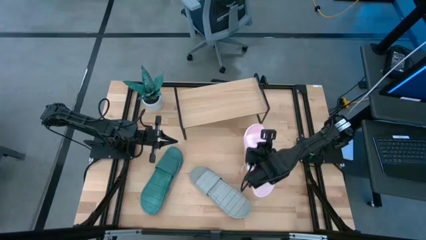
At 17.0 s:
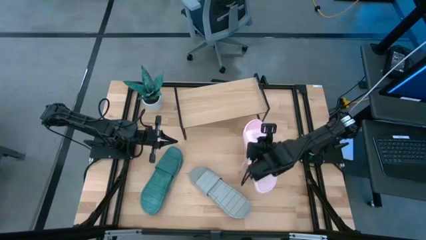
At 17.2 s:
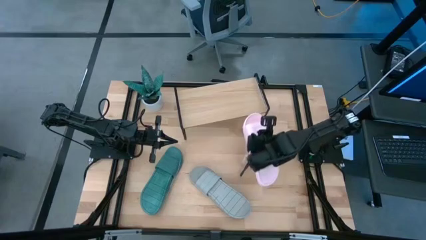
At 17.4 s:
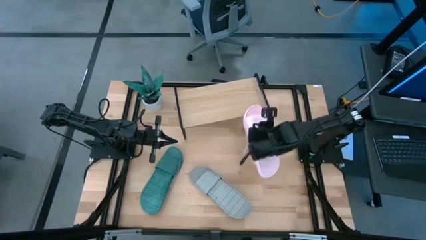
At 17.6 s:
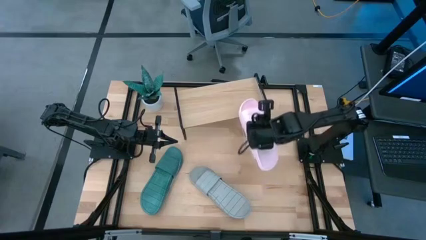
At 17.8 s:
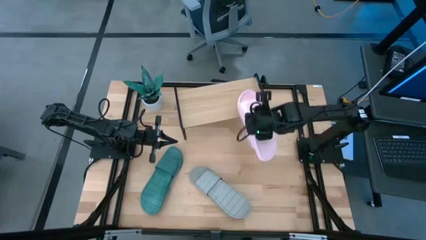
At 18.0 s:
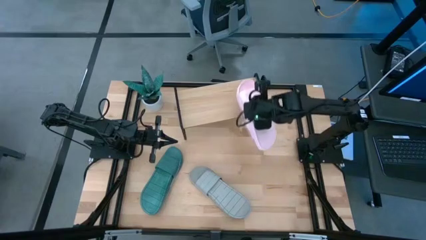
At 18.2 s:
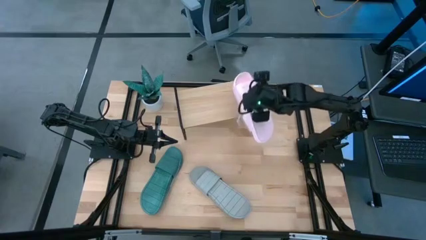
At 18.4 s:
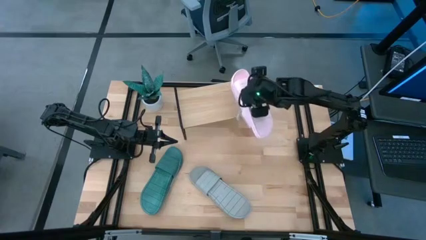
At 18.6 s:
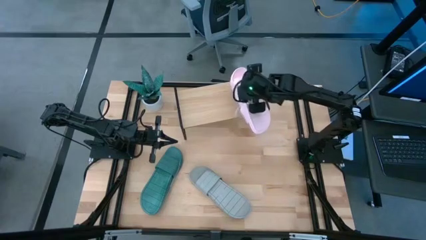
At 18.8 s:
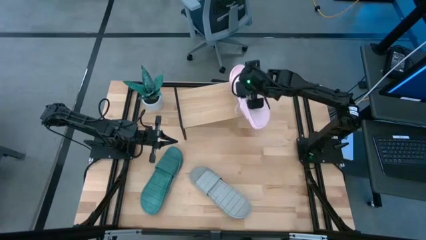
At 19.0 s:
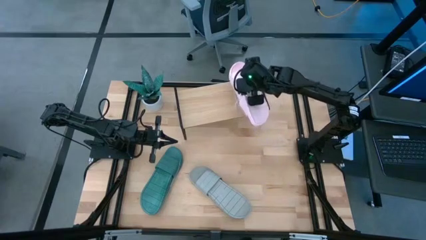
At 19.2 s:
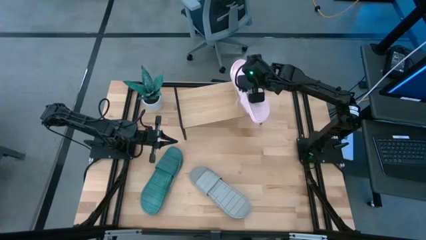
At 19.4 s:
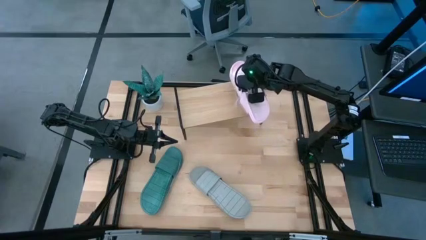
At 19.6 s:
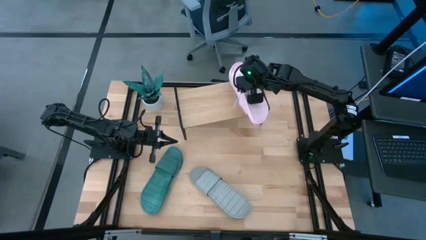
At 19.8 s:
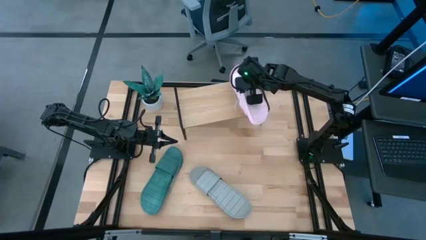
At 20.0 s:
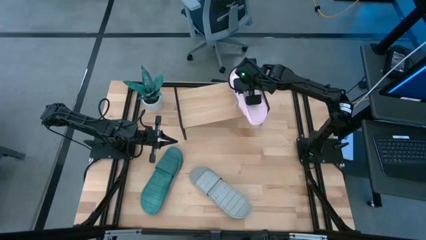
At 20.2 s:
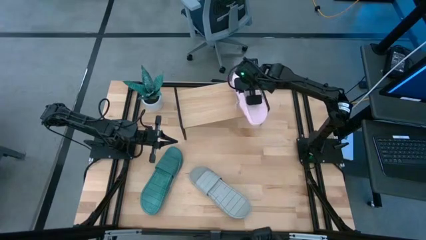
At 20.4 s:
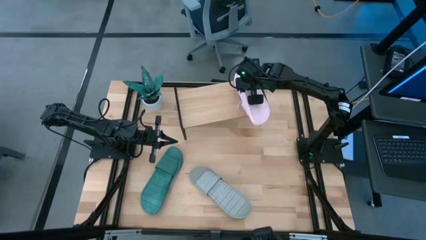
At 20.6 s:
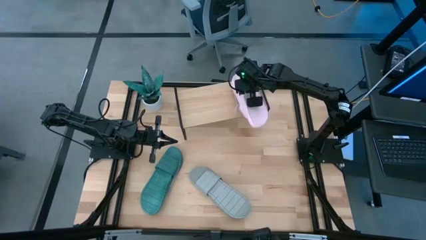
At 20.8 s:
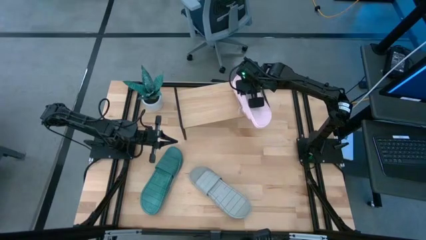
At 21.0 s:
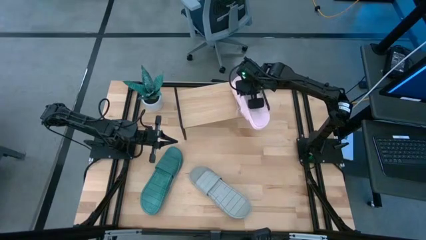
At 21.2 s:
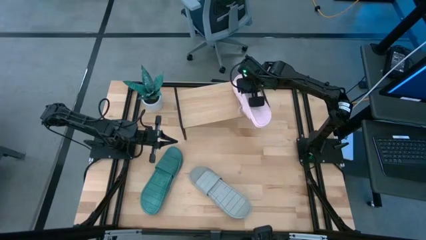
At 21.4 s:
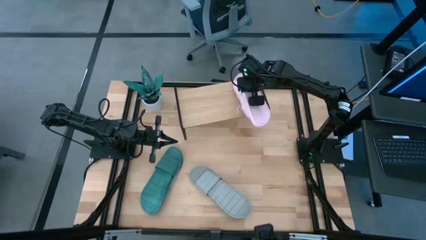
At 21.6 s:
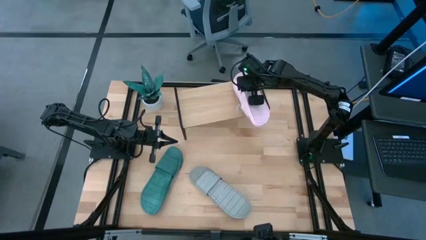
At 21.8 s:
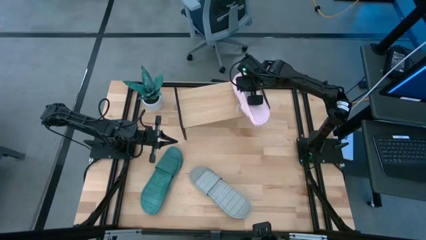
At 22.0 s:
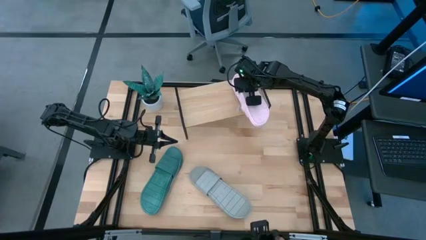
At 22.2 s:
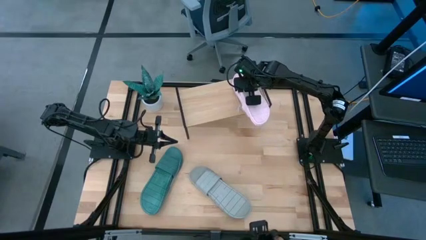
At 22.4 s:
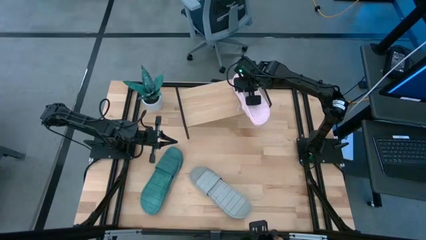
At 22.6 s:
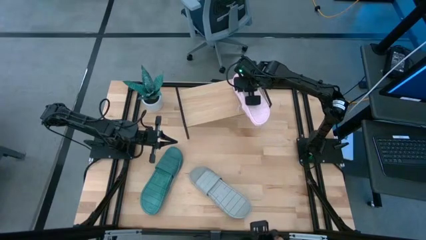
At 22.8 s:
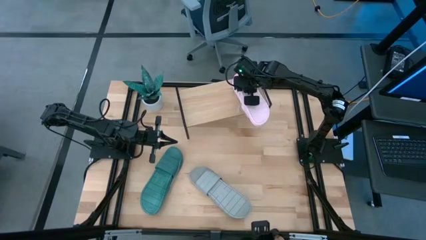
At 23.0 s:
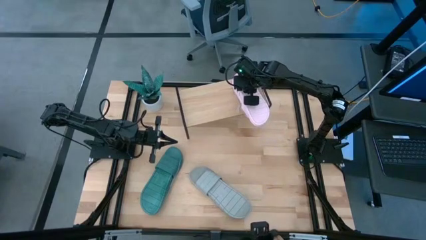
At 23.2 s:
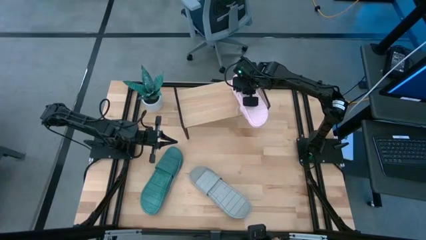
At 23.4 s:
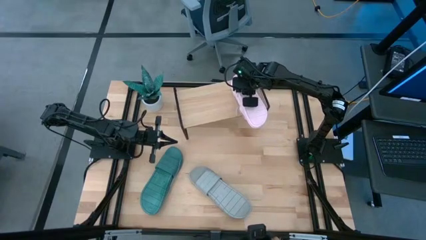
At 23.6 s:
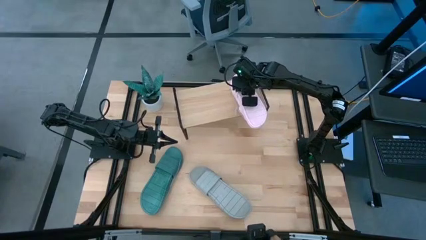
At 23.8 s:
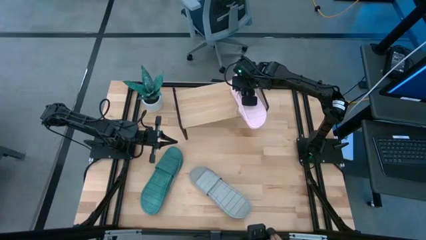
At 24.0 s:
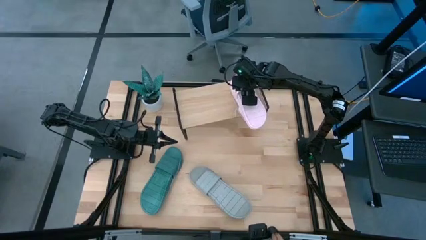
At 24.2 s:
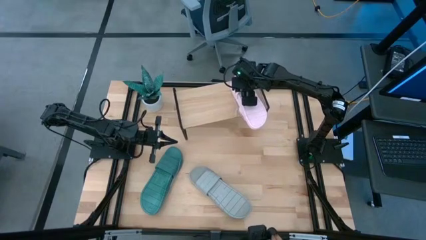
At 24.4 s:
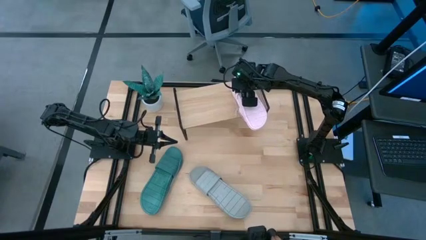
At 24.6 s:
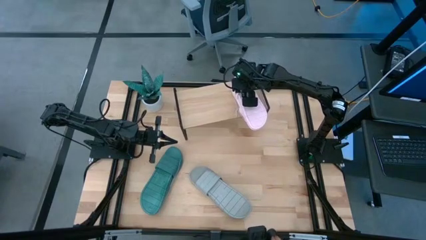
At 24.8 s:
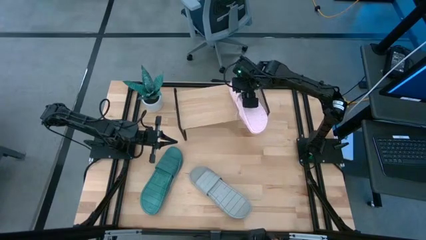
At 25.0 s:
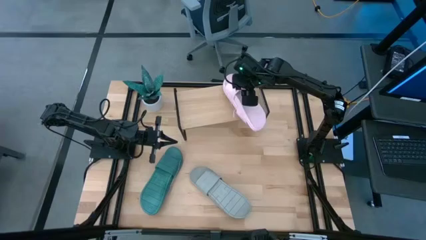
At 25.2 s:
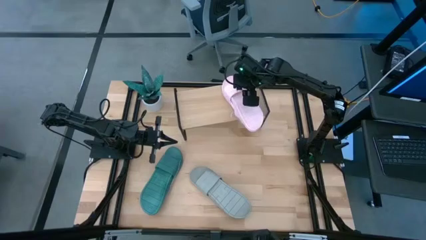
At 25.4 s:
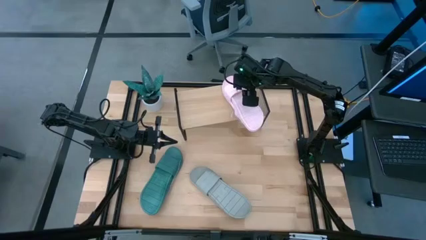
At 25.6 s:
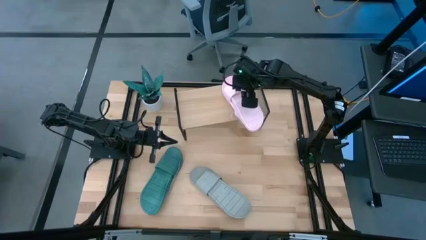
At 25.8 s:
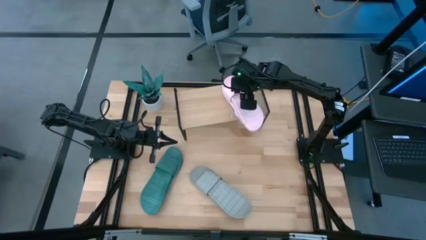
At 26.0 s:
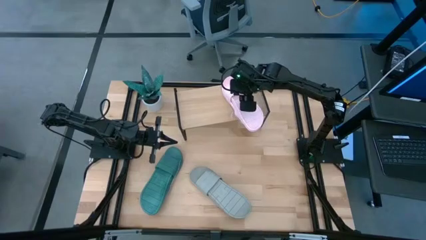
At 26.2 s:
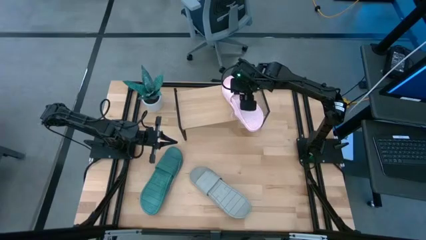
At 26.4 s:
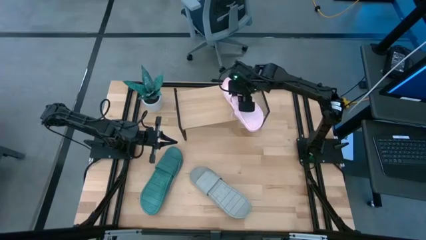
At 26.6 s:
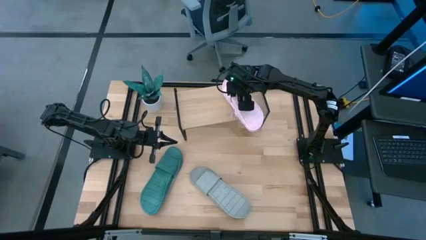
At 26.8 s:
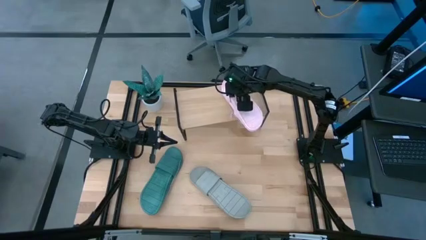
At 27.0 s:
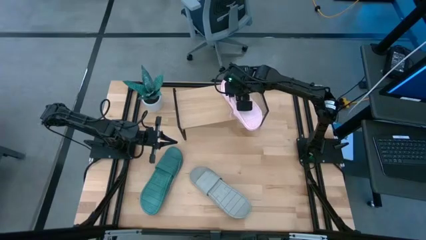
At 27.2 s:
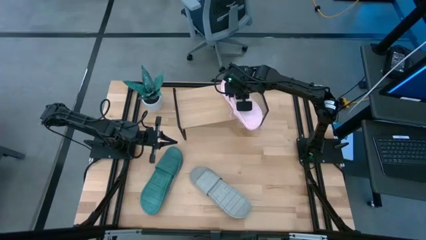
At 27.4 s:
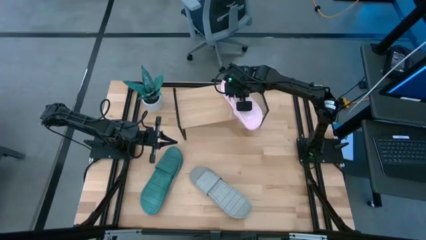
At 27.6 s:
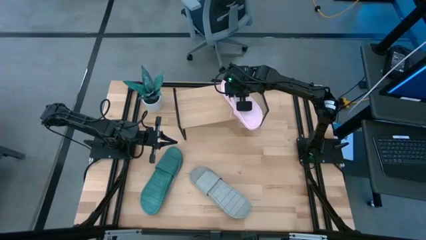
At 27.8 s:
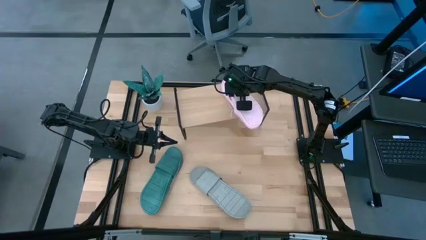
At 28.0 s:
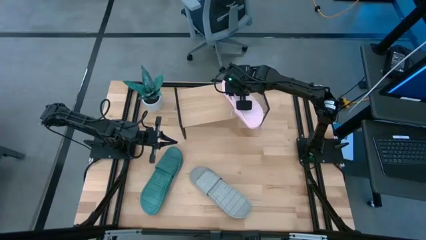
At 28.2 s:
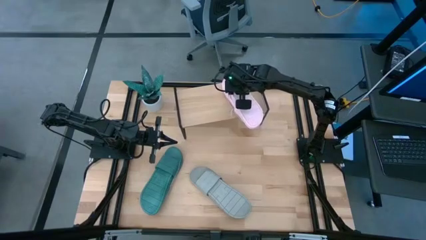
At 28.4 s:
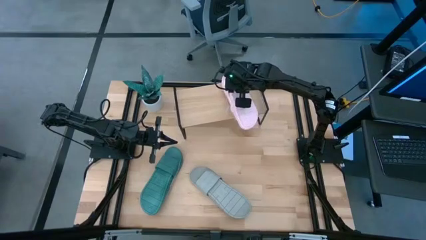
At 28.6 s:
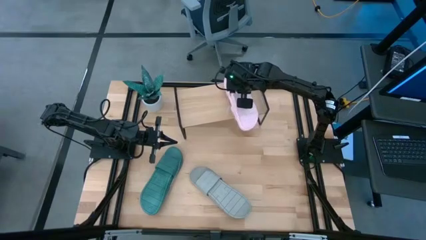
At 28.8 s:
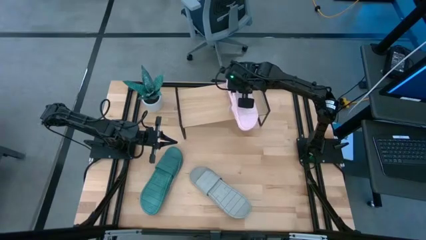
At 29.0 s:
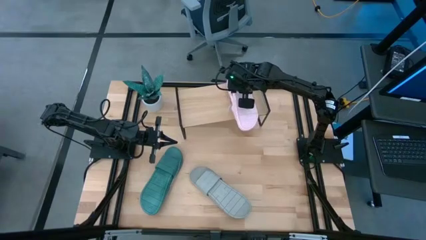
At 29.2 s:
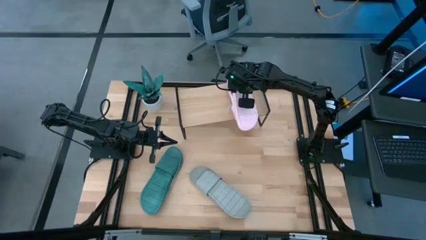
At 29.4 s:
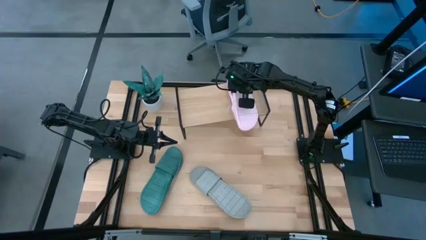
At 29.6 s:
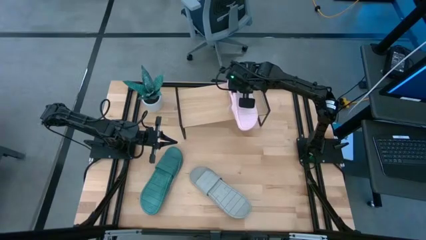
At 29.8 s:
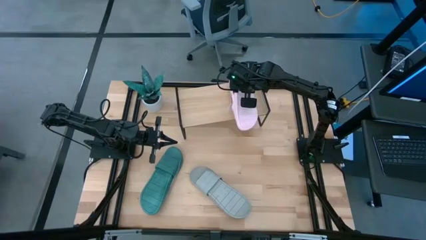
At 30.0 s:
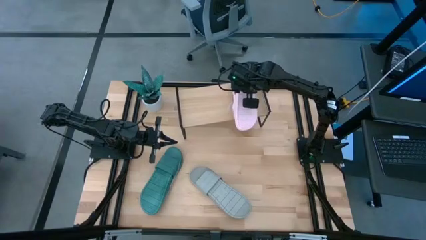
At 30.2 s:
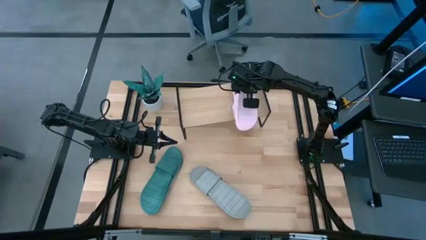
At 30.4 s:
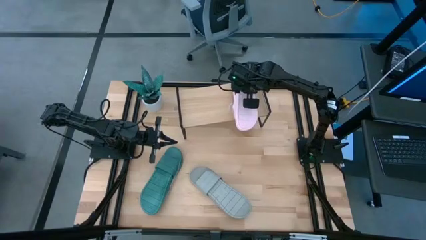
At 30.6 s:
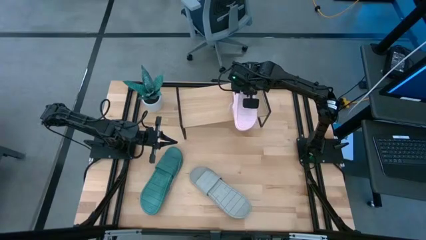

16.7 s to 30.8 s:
Task: Pick and place slides into the shelf
Put the pink pair of slides on the shelf
